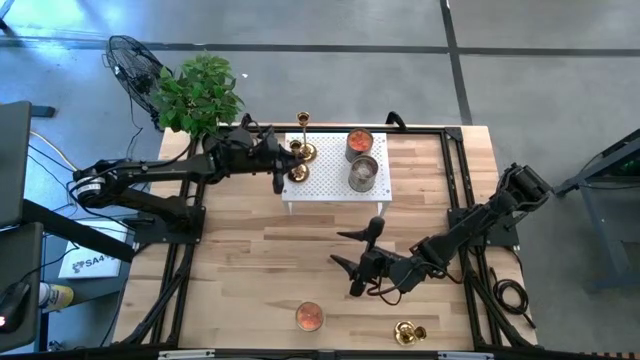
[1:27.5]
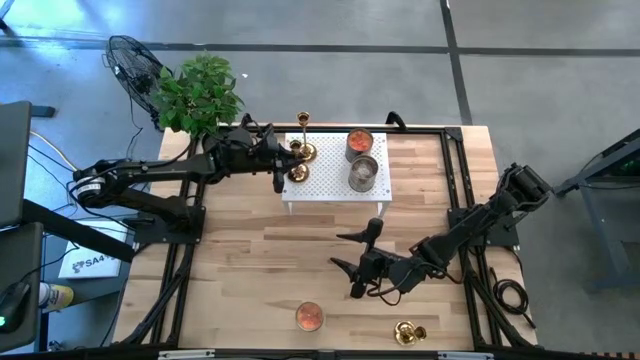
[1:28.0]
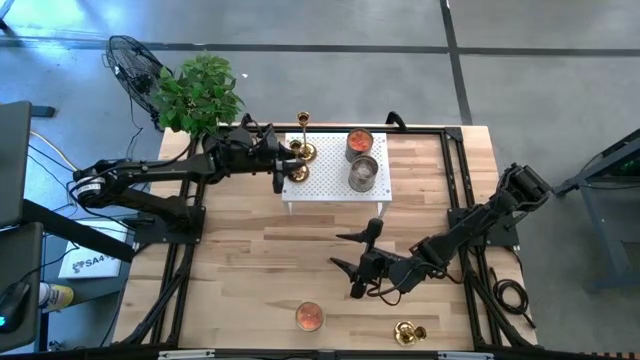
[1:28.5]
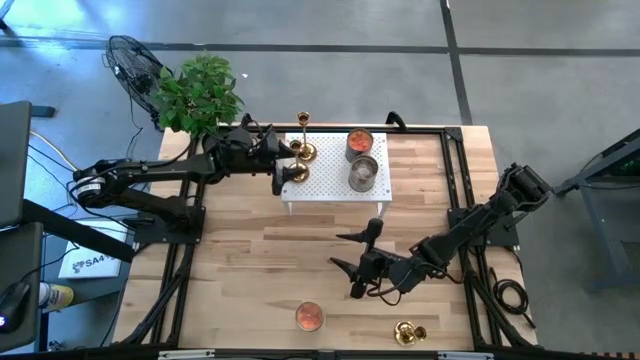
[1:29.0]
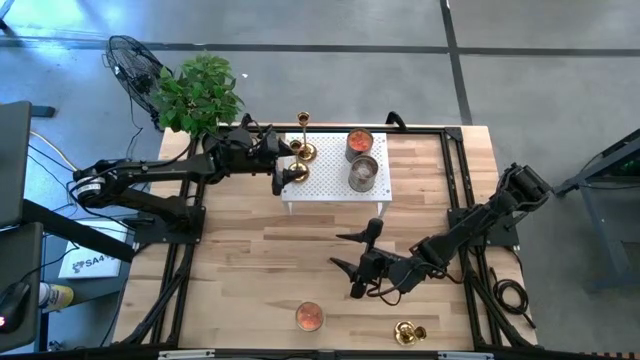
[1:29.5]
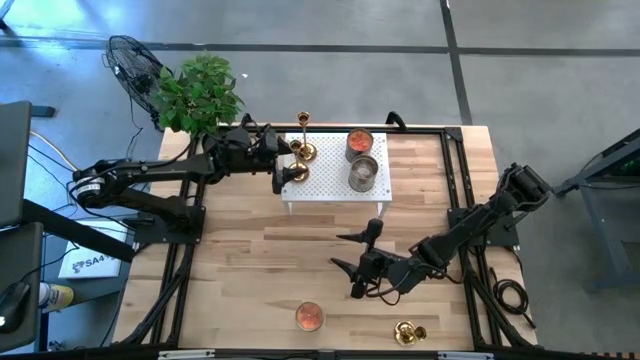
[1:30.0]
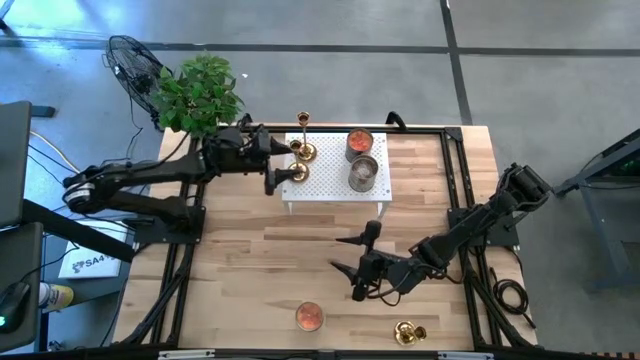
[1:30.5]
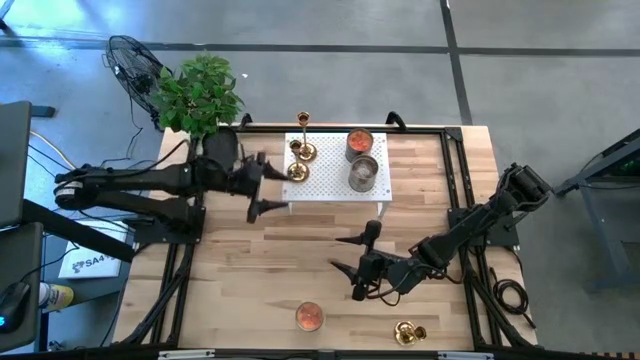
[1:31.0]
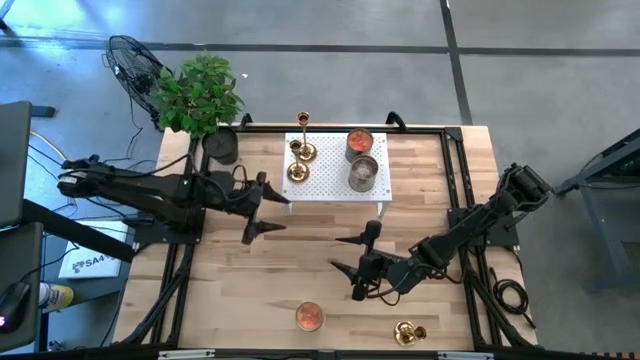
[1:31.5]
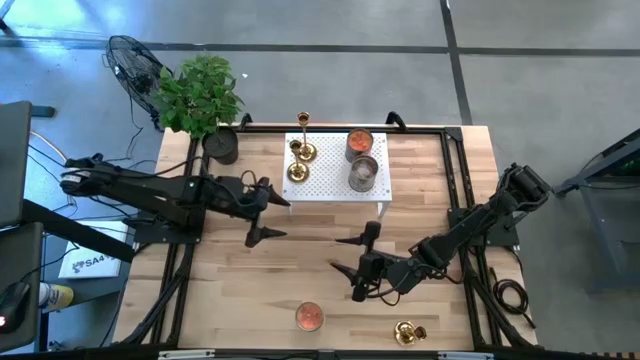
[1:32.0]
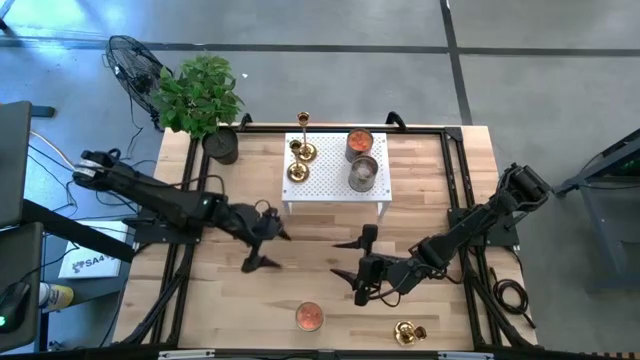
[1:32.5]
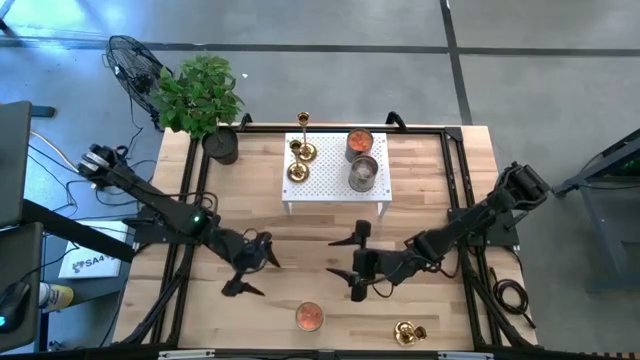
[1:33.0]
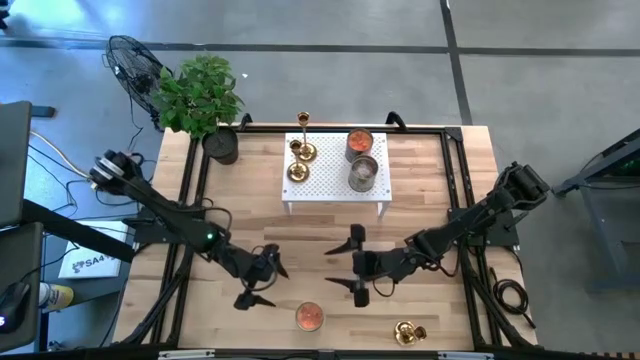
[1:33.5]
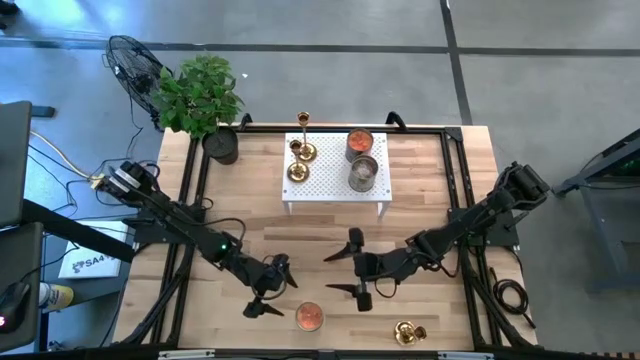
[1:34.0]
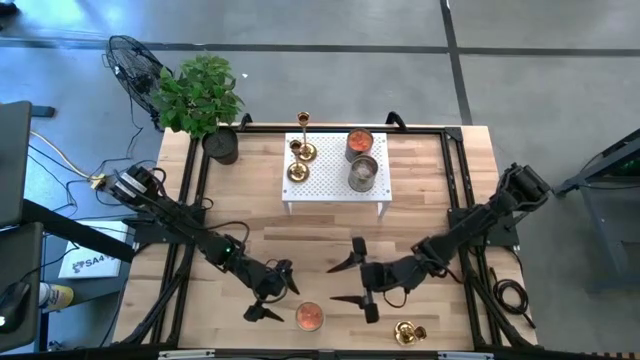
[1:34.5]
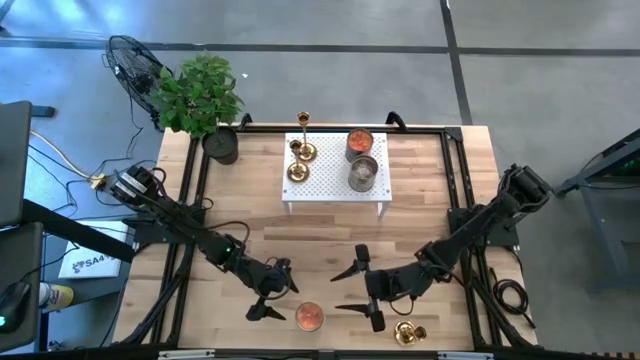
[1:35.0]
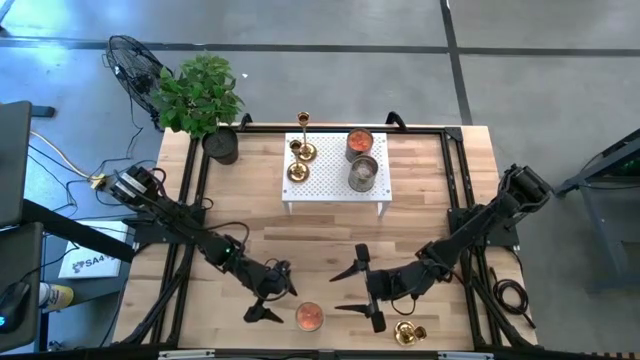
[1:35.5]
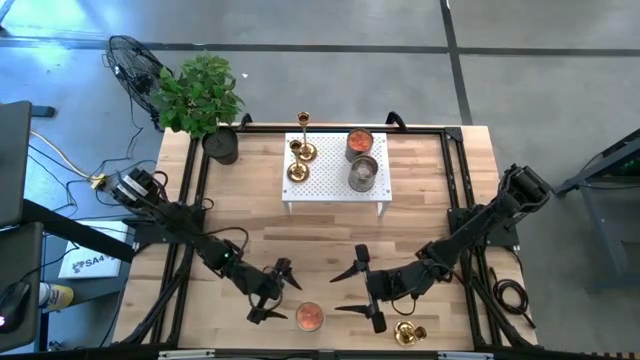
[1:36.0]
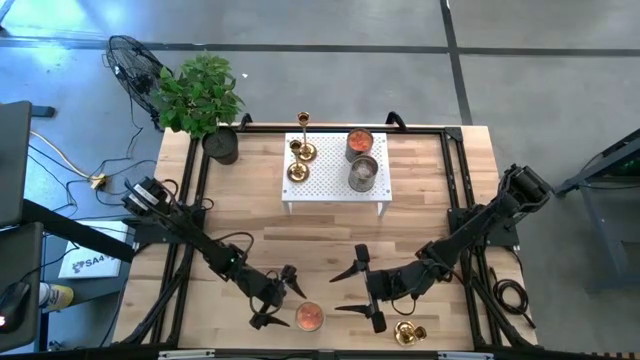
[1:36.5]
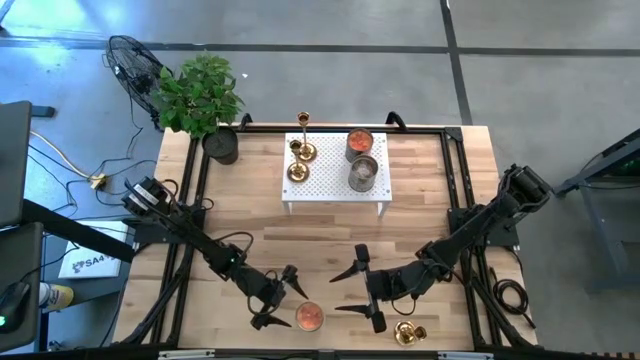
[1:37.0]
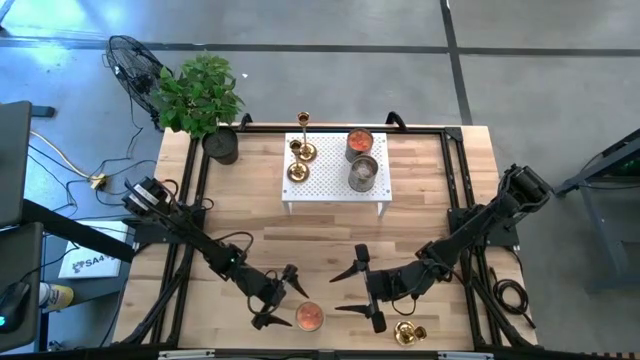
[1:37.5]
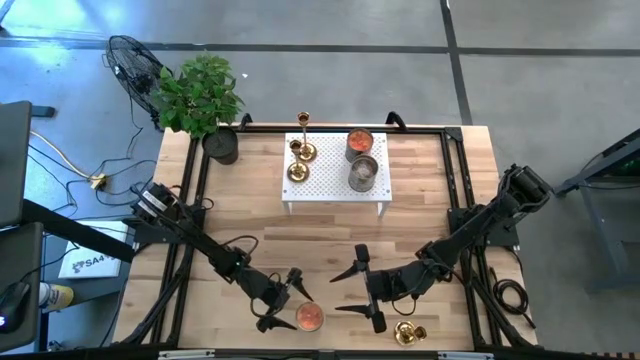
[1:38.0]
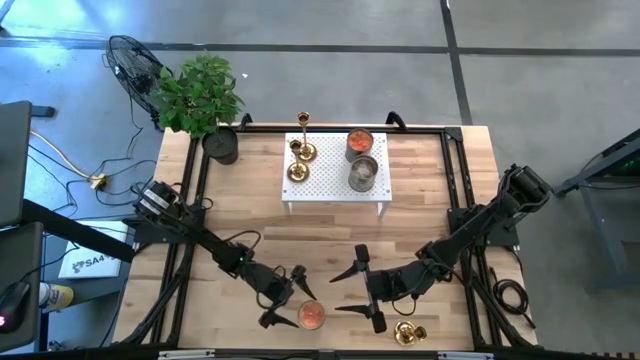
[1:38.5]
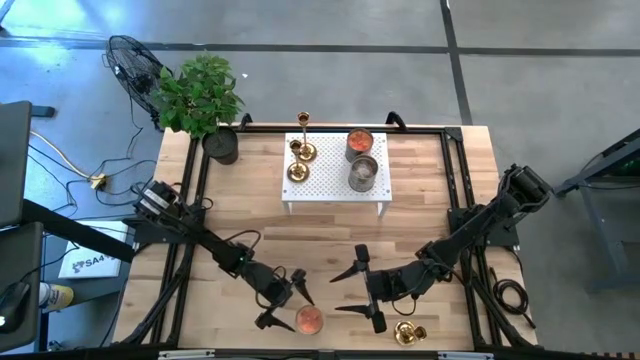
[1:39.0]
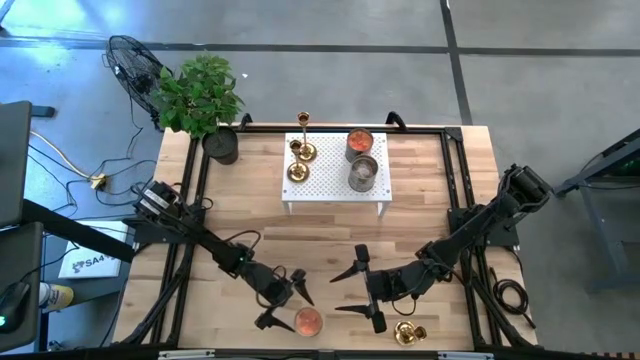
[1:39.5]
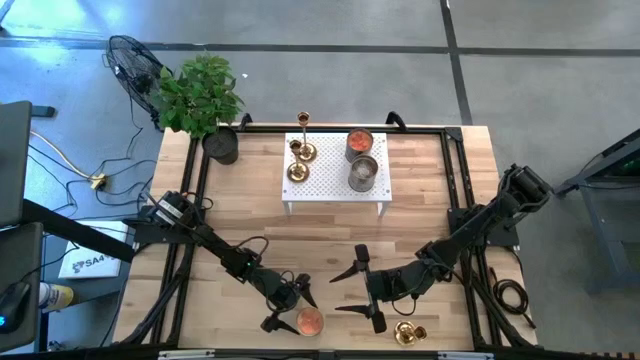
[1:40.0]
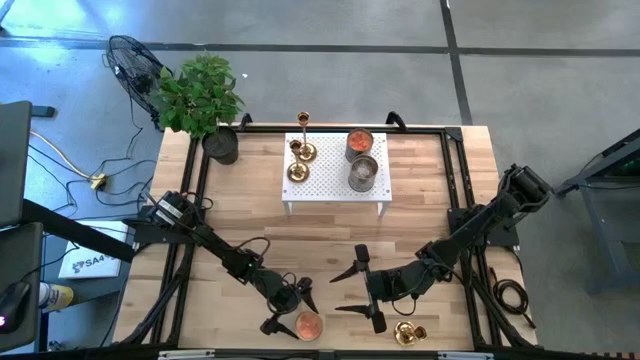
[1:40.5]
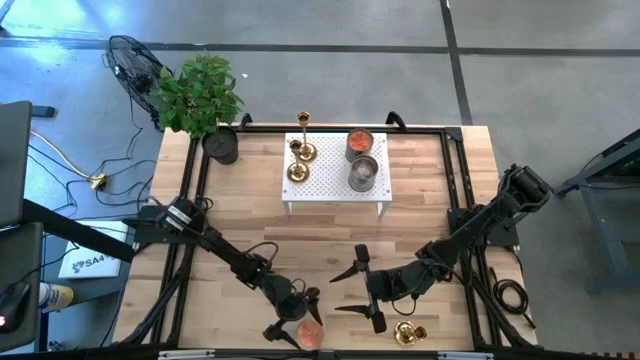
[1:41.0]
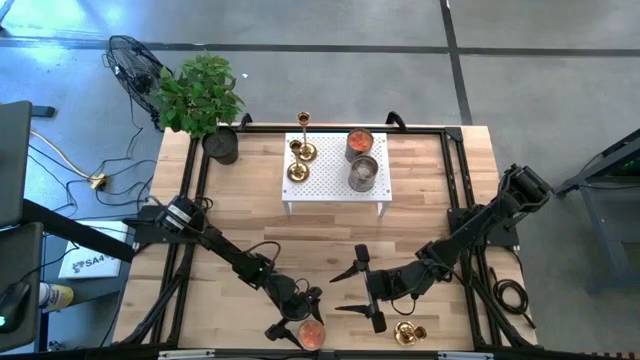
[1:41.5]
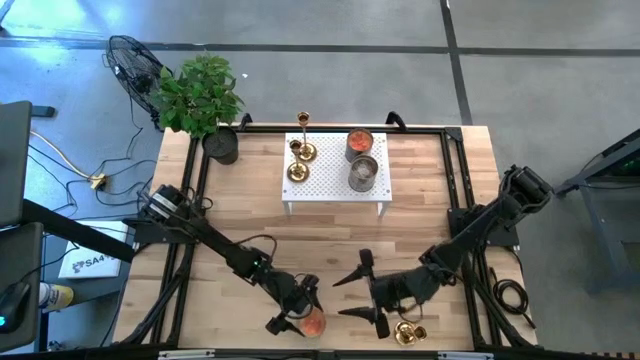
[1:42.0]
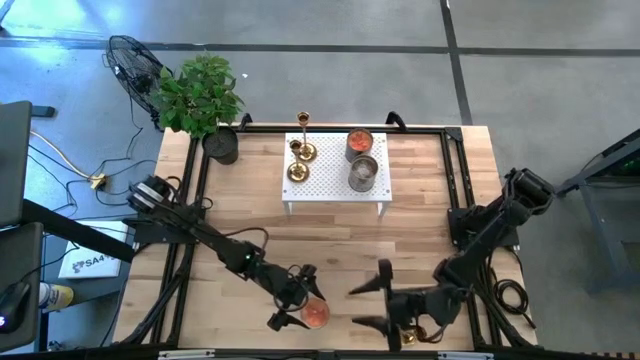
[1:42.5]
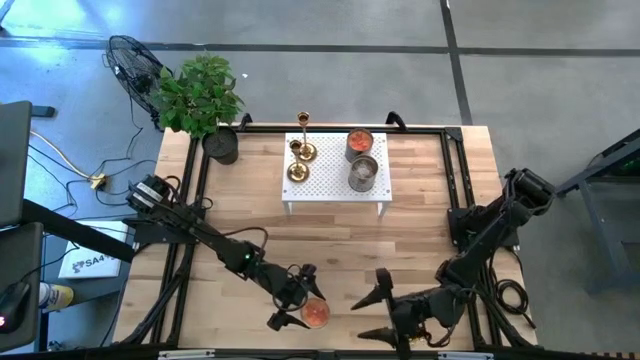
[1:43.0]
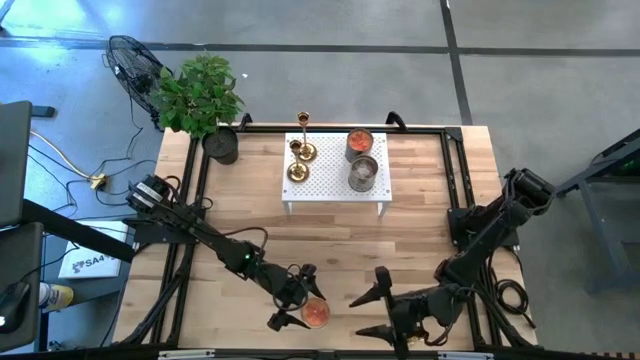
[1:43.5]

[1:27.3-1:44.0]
Task: Pick & Place candle stick holders
Put the orange candle on the shelf

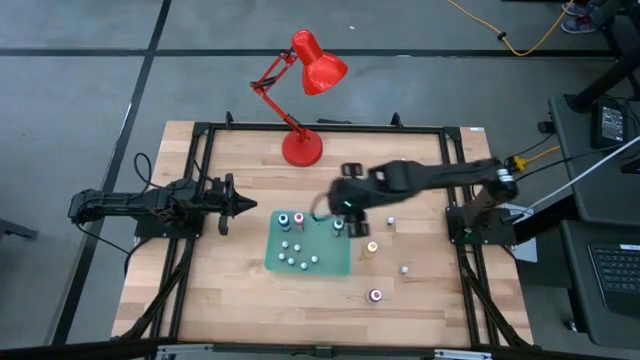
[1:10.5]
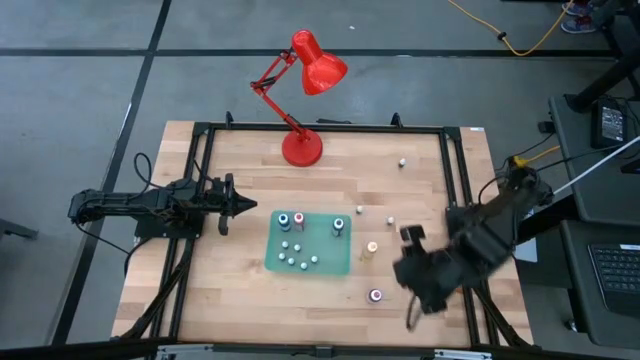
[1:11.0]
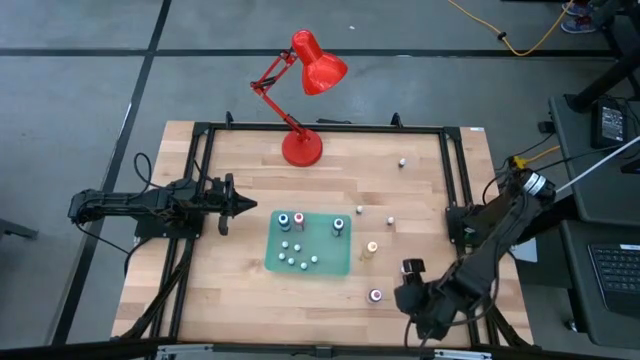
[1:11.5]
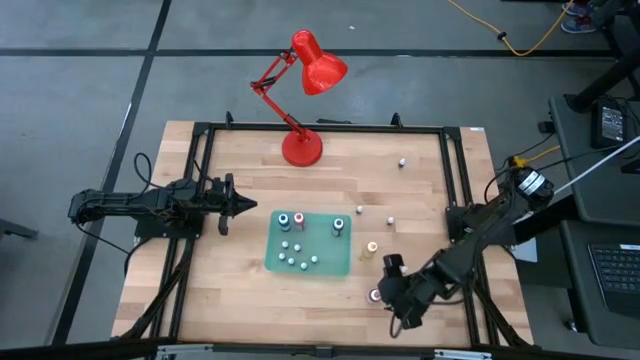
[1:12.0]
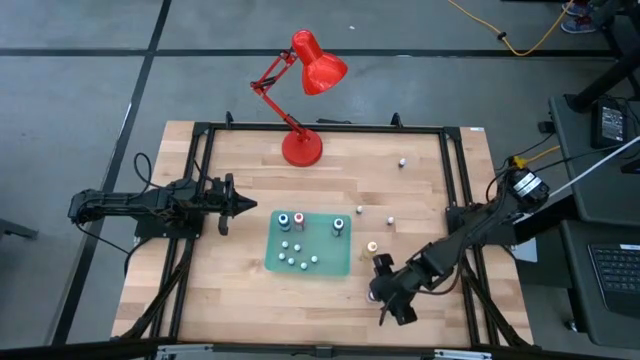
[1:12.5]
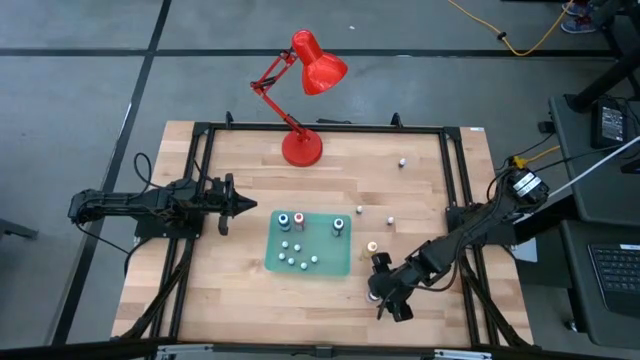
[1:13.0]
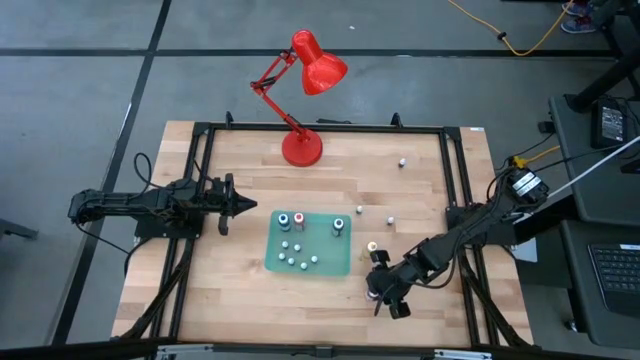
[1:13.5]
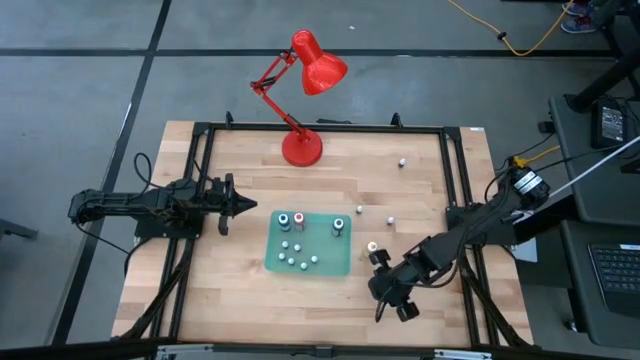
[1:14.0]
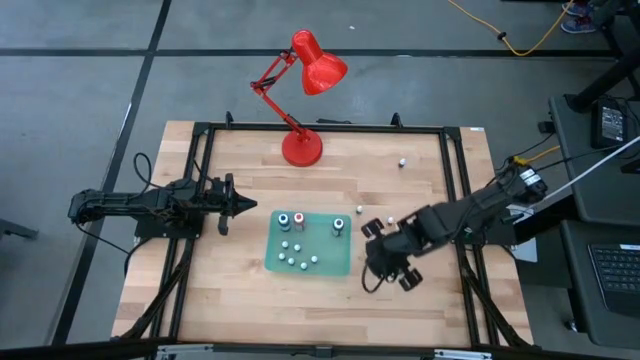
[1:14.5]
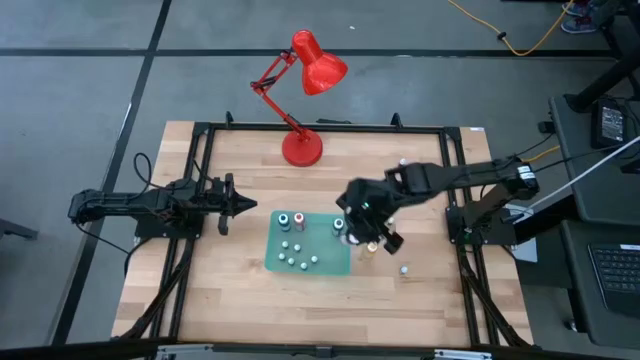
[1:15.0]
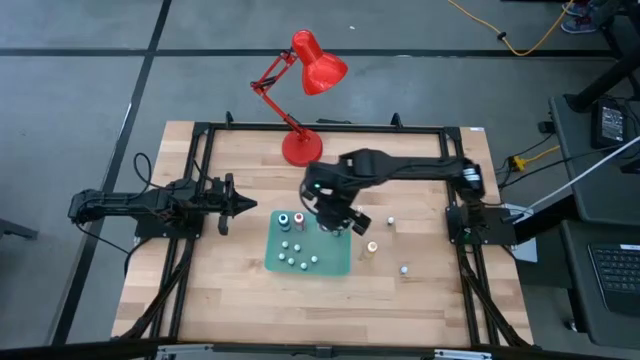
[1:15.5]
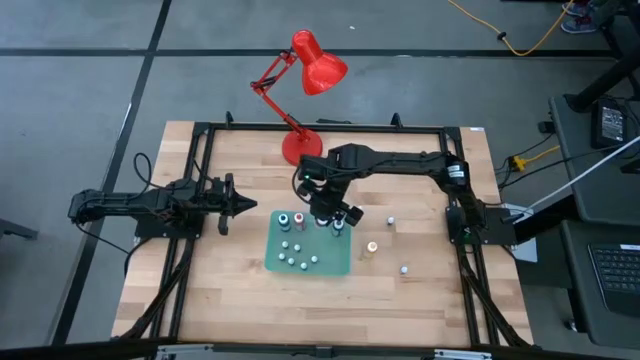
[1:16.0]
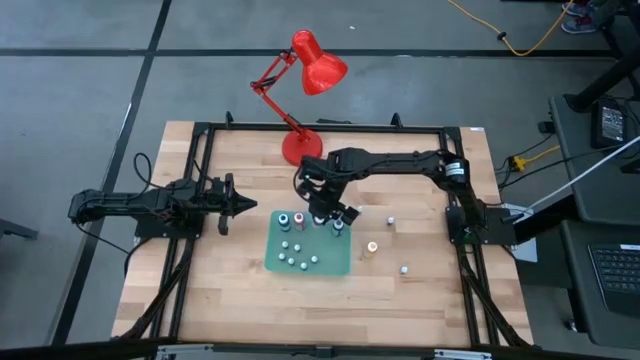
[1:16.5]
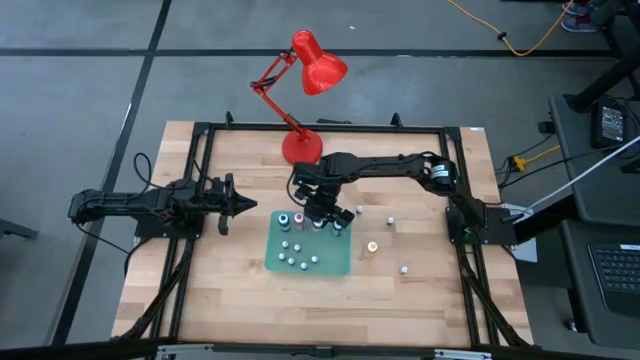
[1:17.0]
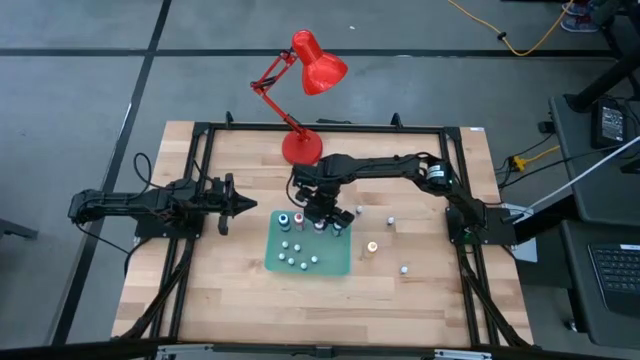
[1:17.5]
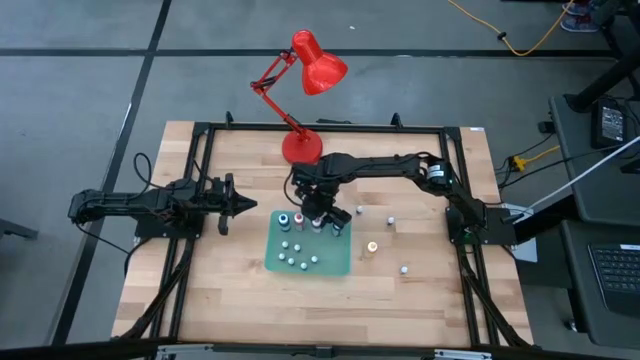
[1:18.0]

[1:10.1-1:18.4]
Task: Pick & Place food coloring
Put the large pink bottle into the green bin
